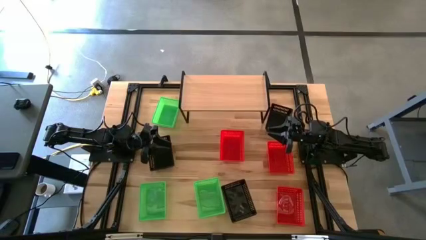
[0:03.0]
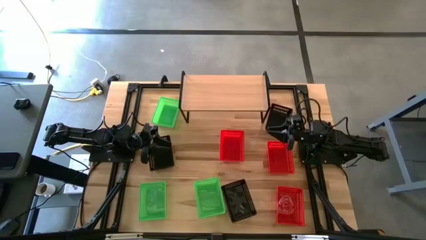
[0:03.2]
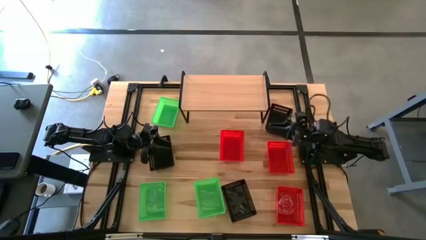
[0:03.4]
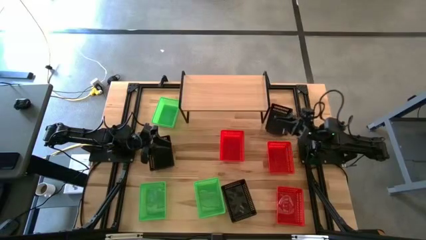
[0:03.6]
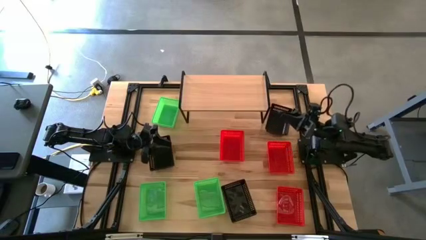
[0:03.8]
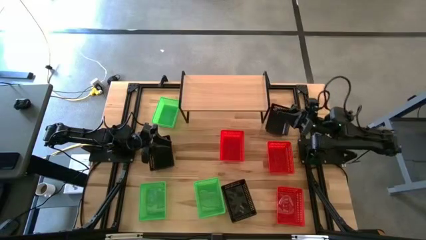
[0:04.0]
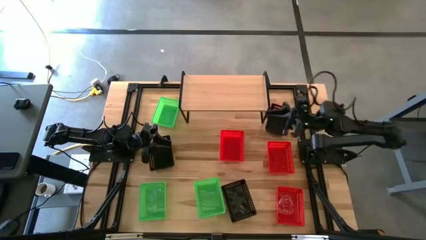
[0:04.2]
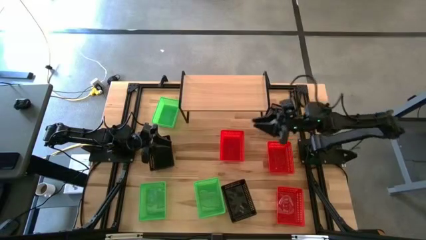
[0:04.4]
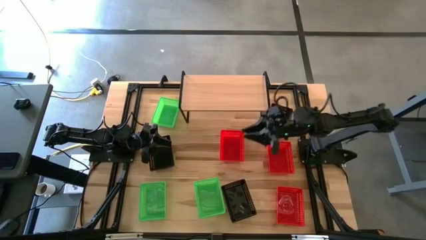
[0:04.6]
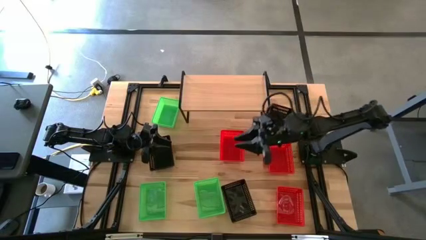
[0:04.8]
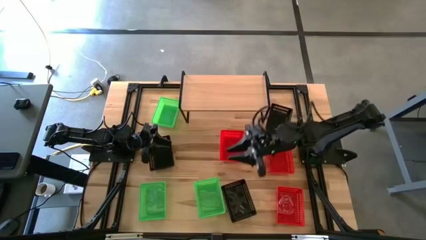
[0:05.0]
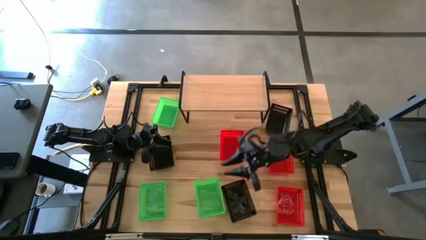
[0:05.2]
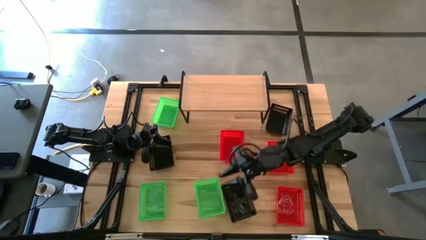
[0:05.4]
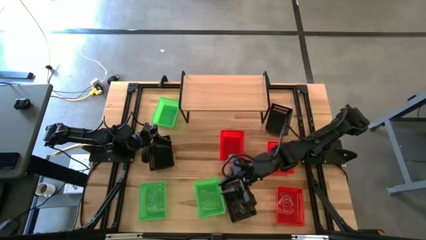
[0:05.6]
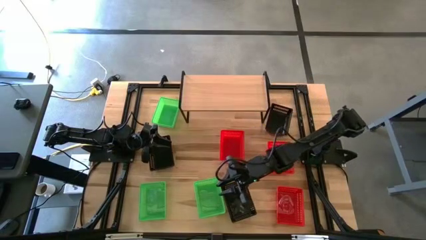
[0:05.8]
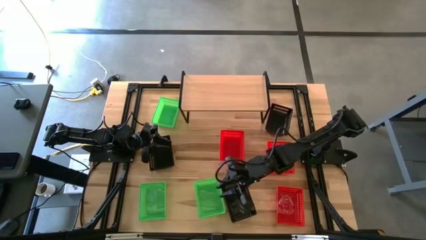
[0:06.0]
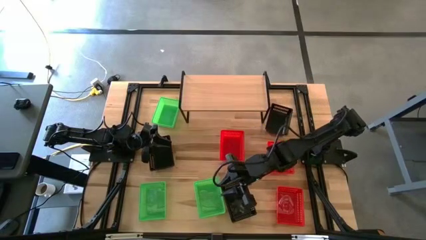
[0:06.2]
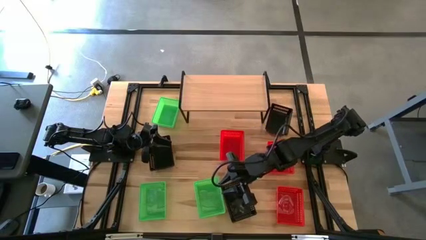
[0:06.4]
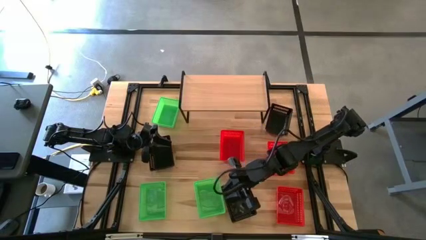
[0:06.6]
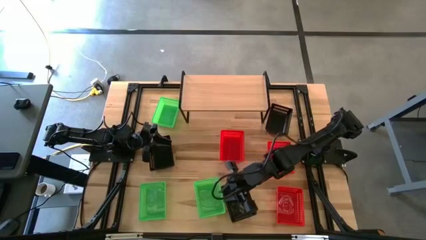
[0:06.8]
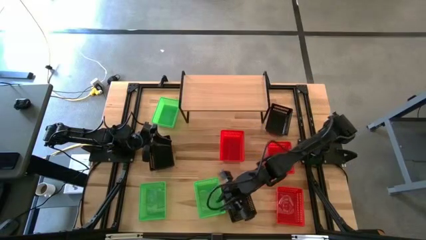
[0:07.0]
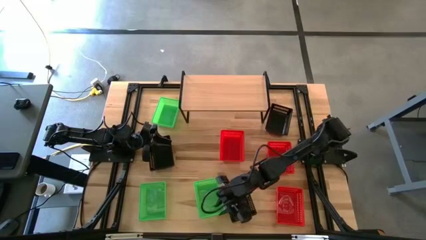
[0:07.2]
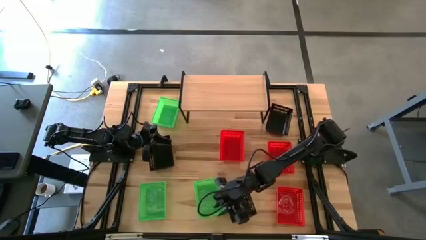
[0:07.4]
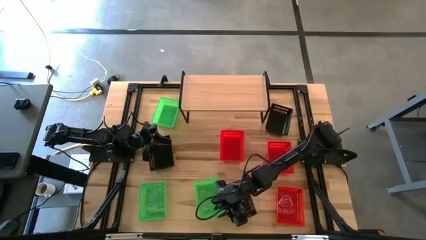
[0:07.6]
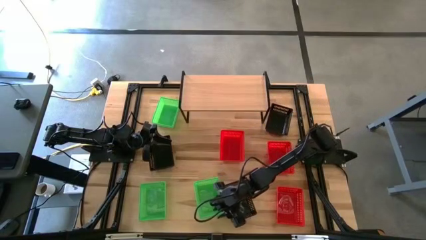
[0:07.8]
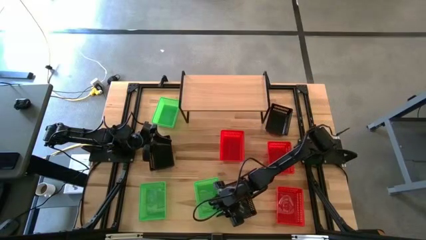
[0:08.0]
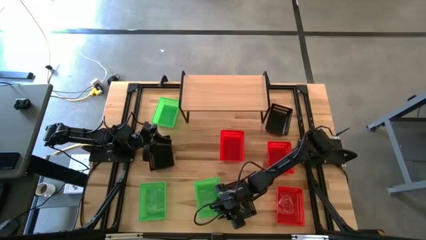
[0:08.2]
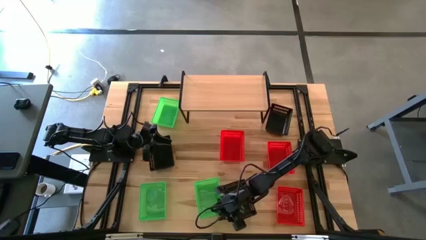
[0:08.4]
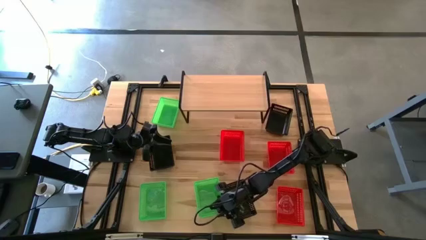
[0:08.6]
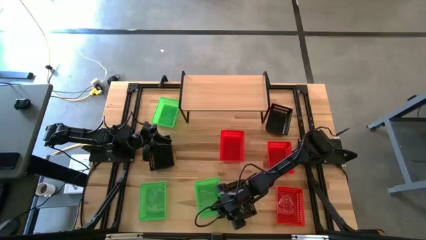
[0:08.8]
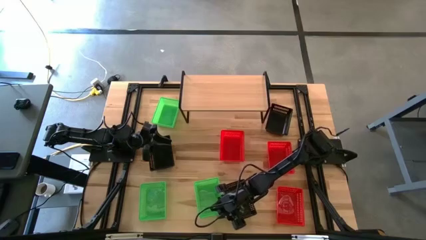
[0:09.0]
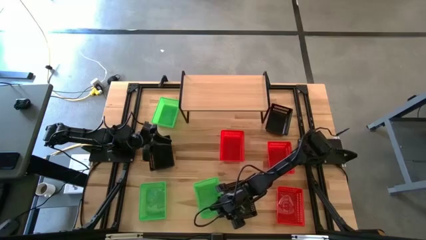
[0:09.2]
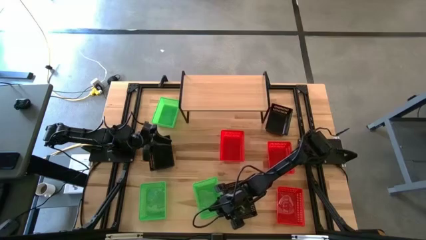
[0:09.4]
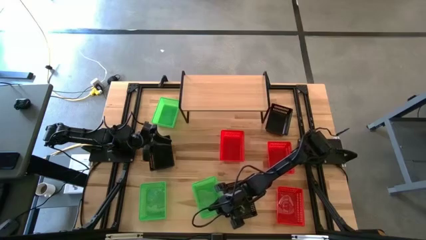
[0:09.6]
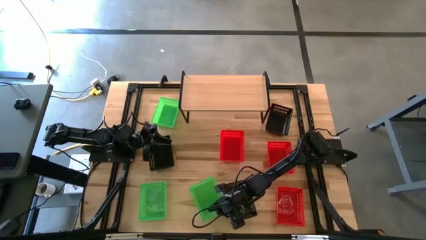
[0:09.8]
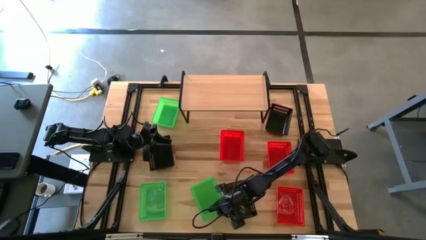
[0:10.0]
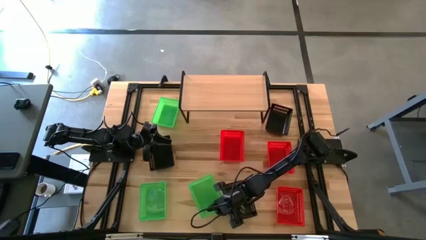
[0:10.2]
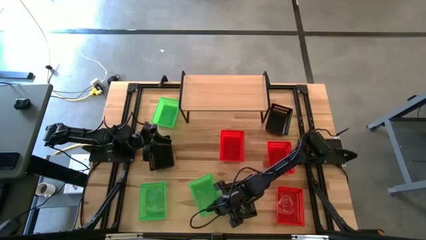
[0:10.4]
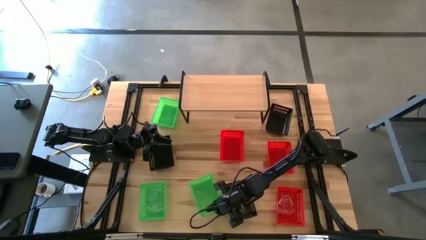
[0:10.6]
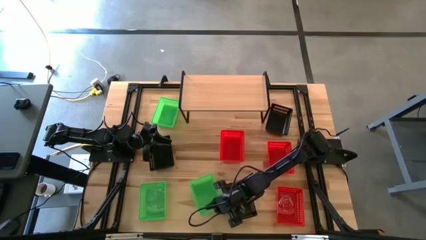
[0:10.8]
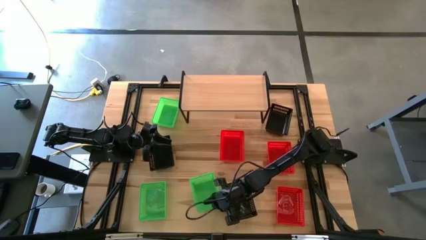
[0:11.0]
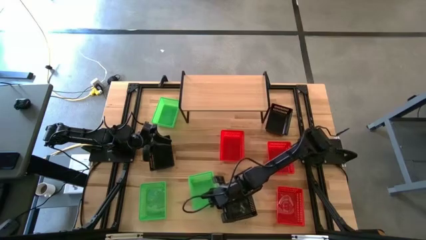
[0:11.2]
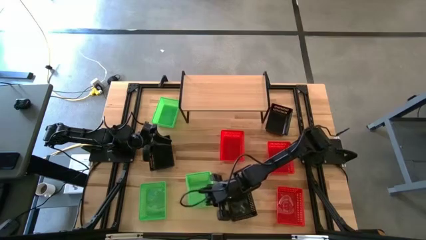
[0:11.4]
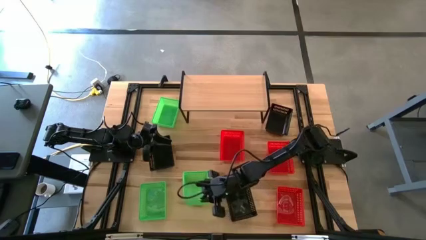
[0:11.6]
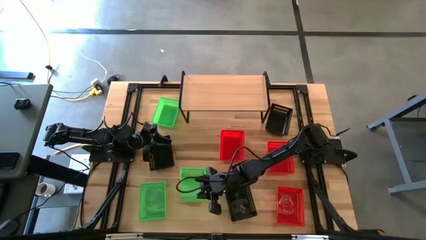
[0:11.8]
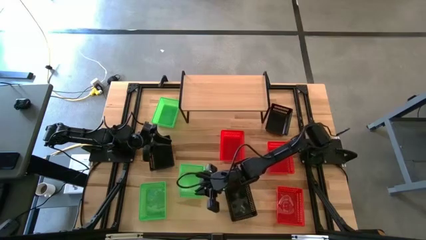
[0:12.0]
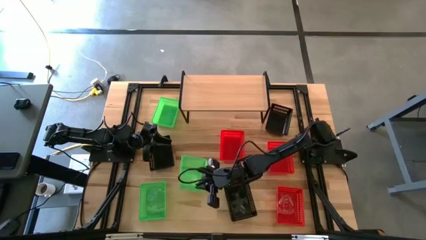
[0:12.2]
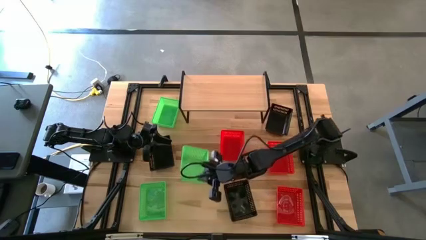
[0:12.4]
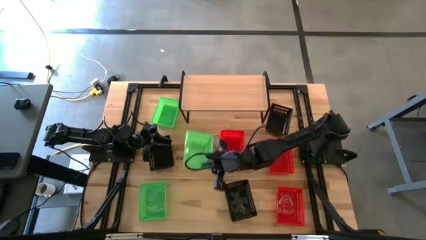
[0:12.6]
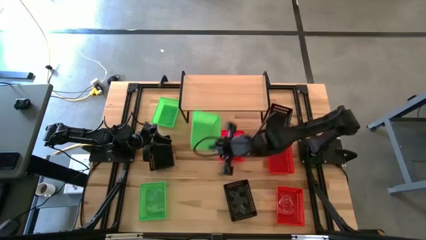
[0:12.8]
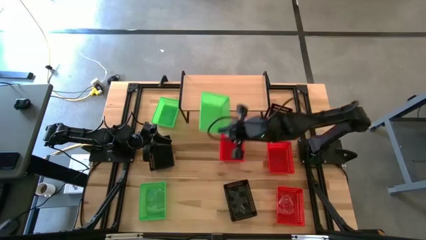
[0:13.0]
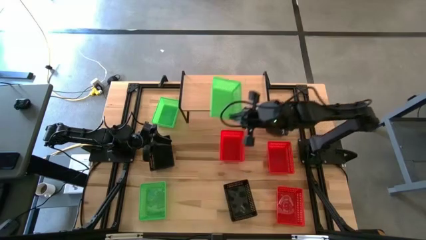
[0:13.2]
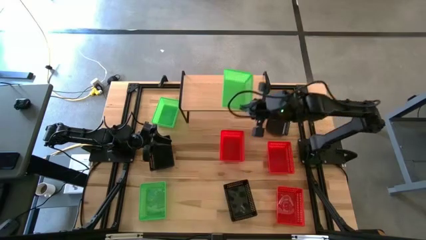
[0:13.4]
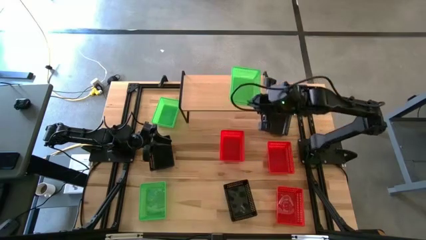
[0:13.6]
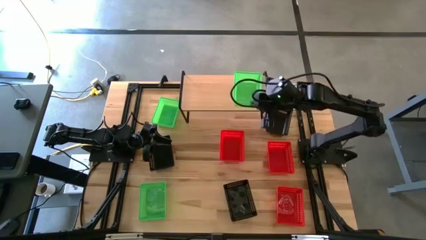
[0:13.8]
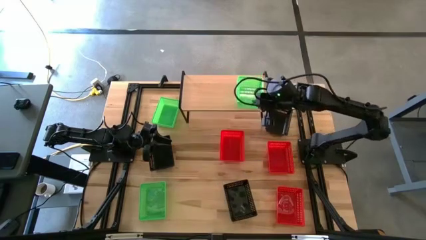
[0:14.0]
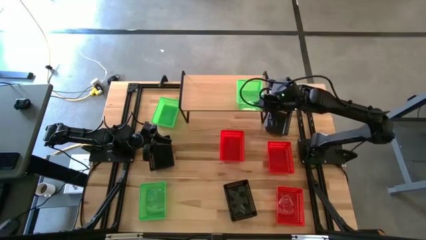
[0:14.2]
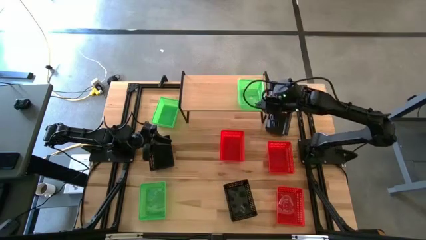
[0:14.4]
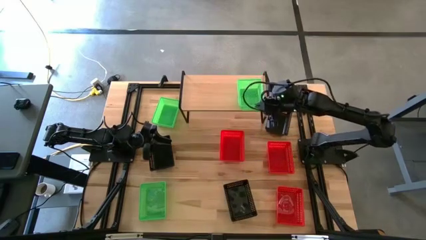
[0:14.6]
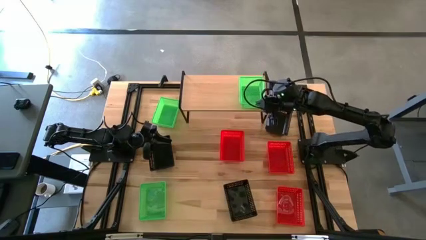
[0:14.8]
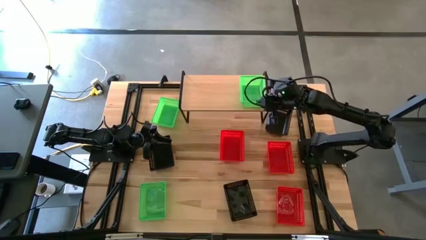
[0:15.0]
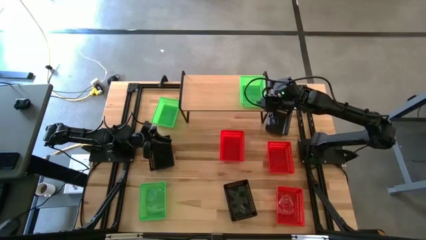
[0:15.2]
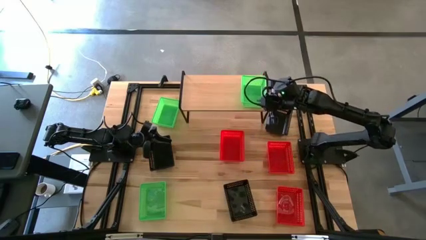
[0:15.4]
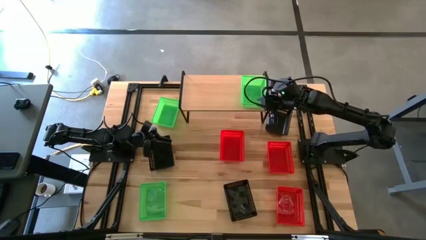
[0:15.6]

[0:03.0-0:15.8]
Task: Stack baskets on shelf by color
Put the bottom right green bin on the shelf

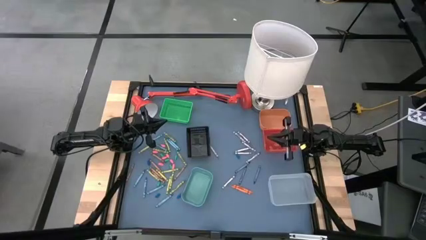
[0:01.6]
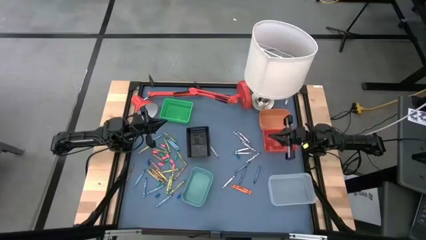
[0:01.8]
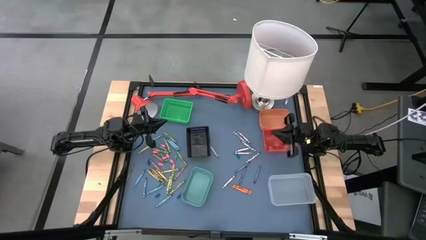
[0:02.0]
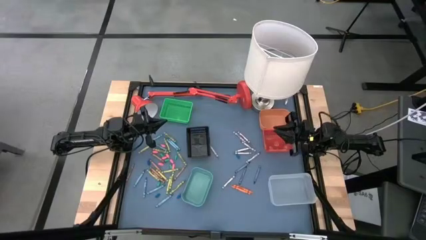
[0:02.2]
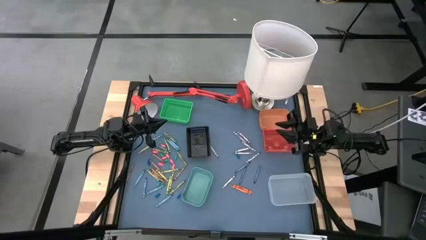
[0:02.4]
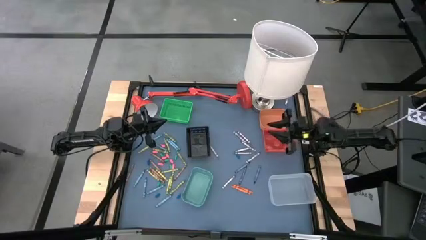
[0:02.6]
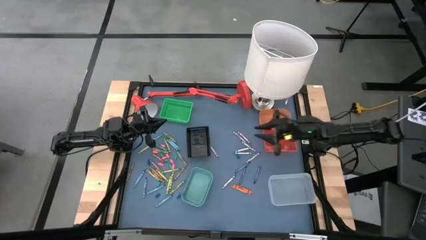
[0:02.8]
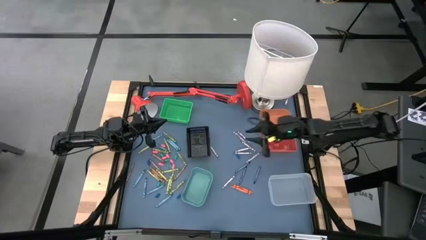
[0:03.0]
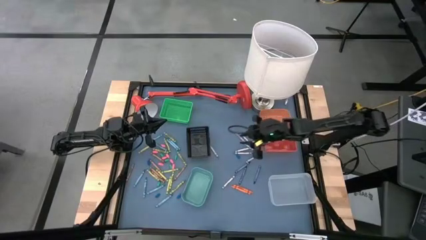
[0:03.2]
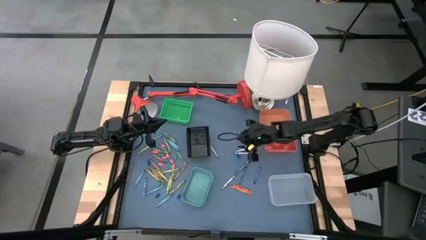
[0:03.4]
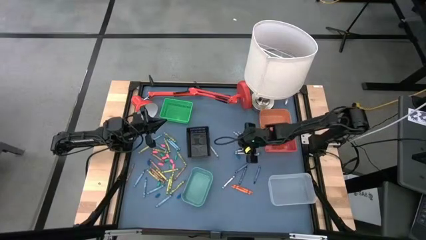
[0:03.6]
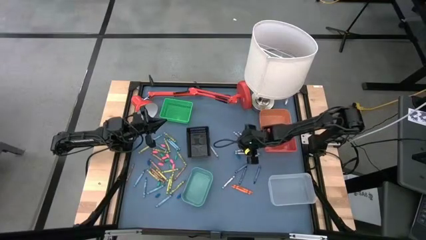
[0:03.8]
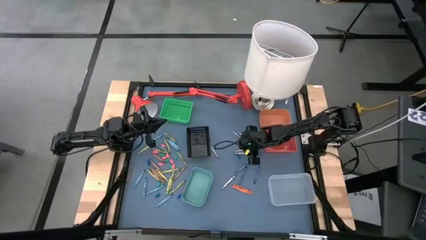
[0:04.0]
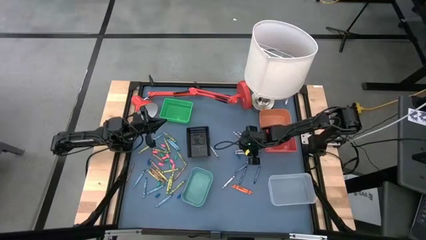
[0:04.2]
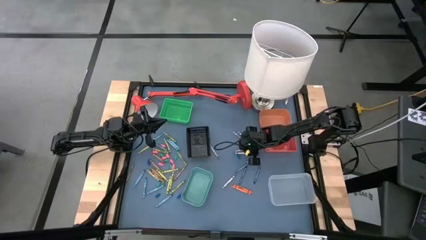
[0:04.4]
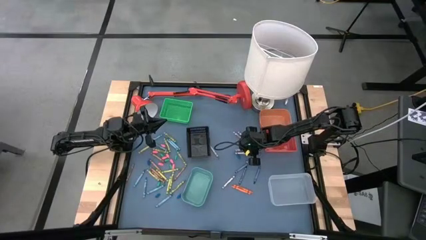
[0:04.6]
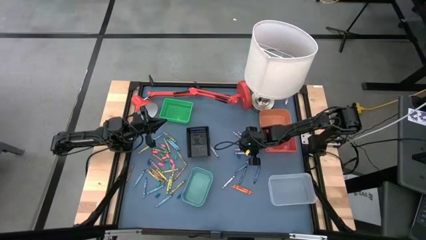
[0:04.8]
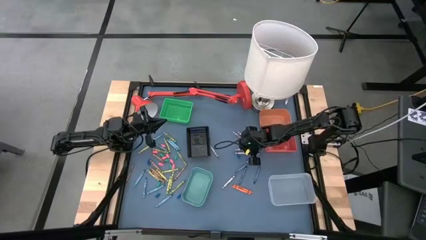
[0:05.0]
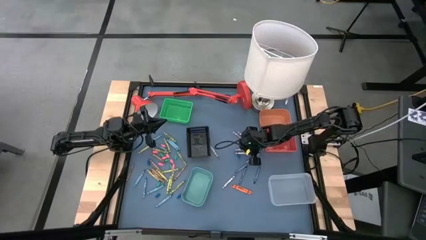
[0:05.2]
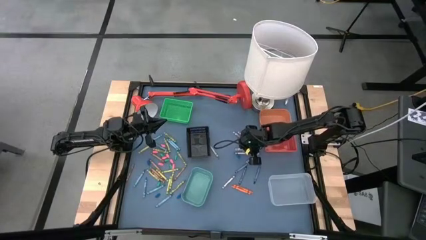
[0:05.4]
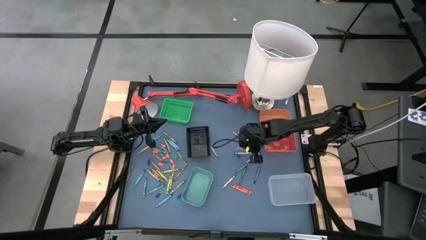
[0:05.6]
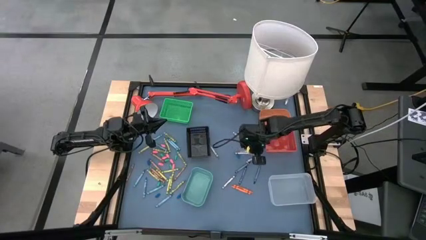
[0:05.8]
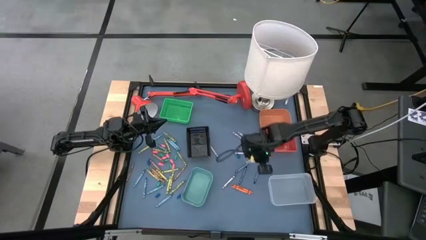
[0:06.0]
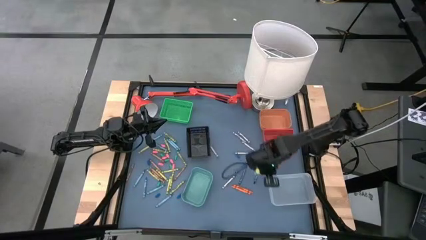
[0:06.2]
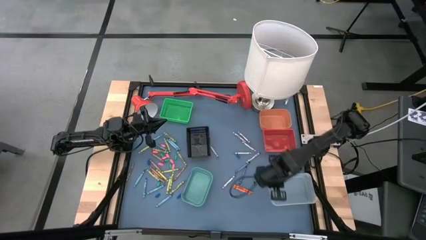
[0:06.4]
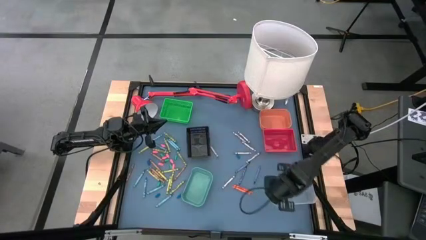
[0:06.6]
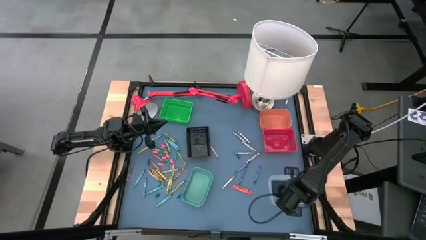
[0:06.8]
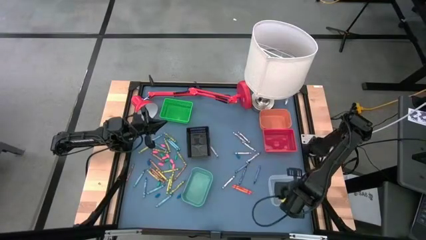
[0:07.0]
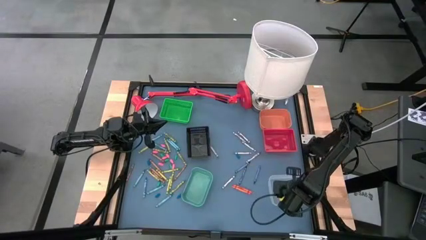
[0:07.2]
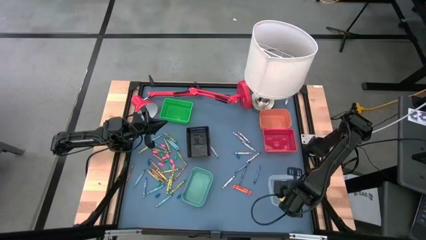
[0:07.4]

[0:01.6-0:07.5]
Task: Sort crayons
Put the gray crayon into the white bin
